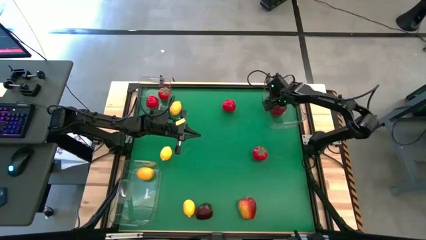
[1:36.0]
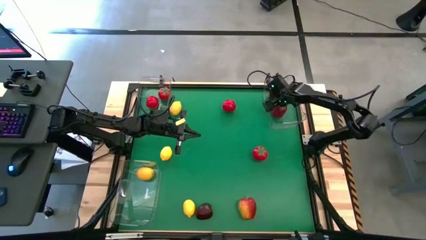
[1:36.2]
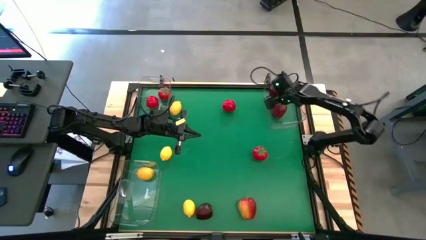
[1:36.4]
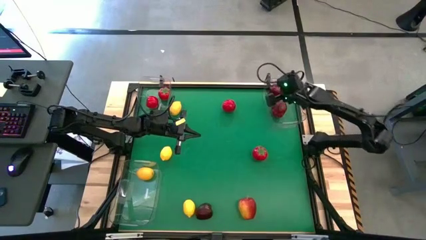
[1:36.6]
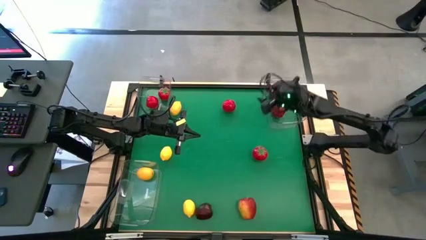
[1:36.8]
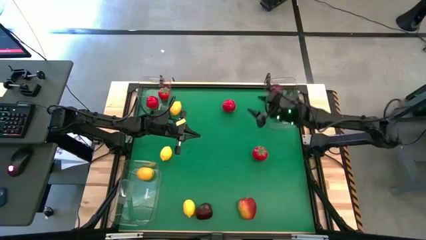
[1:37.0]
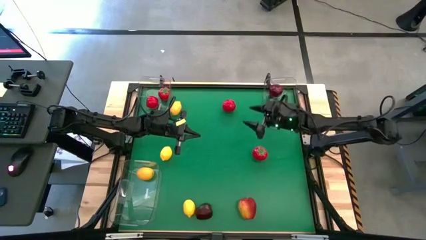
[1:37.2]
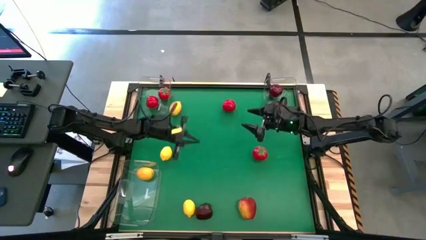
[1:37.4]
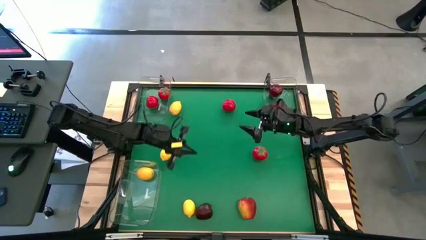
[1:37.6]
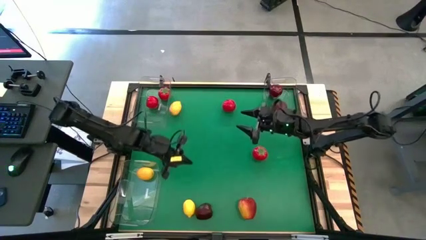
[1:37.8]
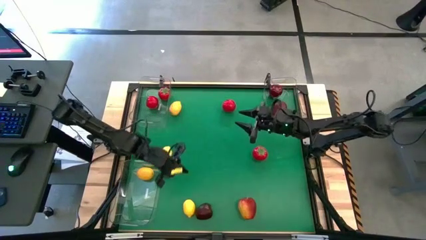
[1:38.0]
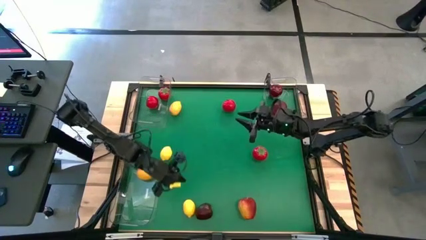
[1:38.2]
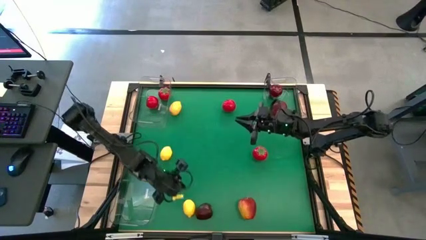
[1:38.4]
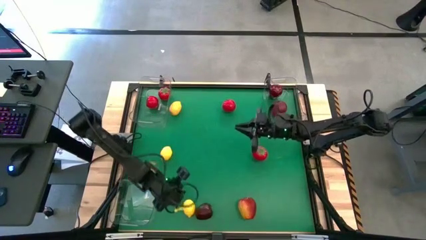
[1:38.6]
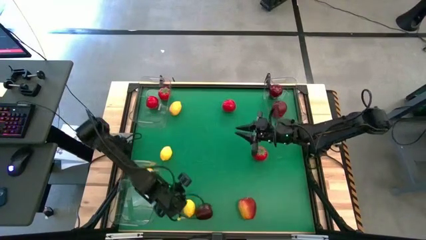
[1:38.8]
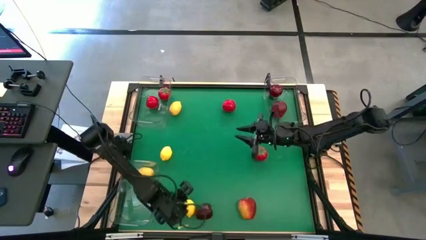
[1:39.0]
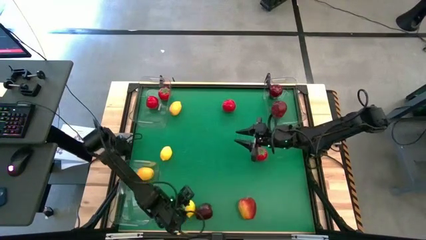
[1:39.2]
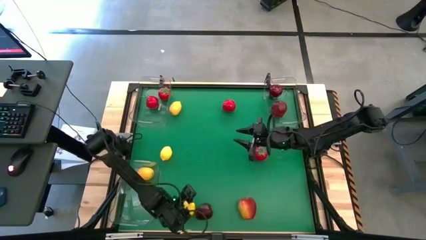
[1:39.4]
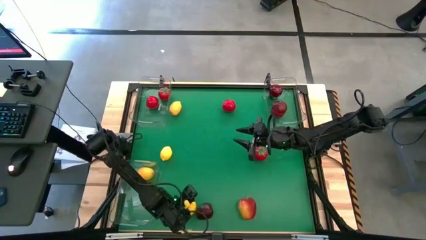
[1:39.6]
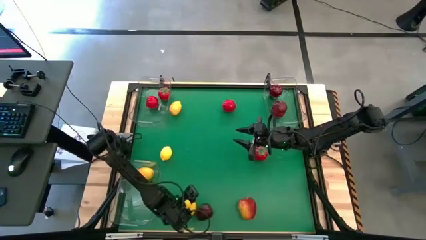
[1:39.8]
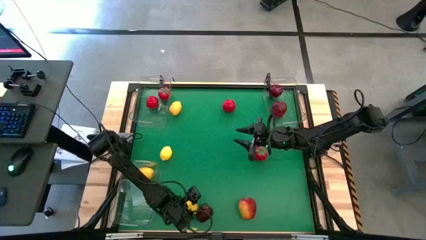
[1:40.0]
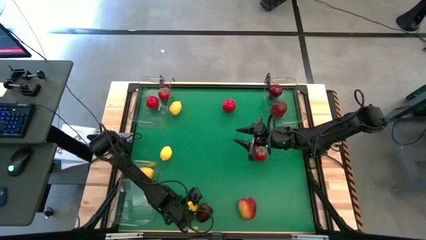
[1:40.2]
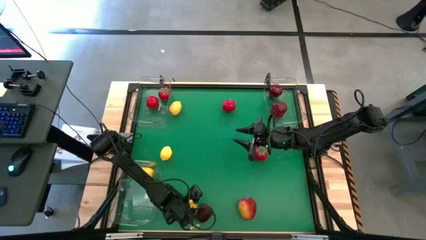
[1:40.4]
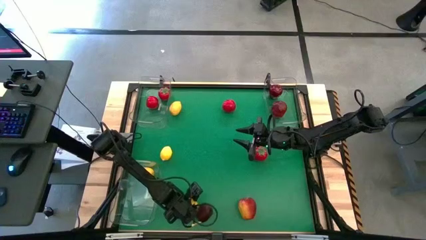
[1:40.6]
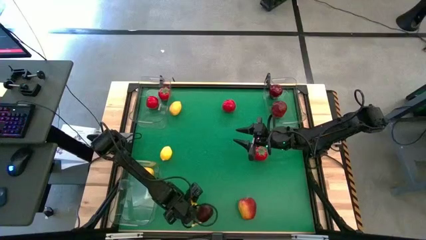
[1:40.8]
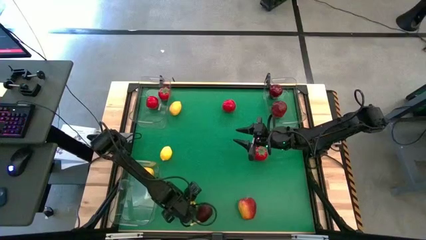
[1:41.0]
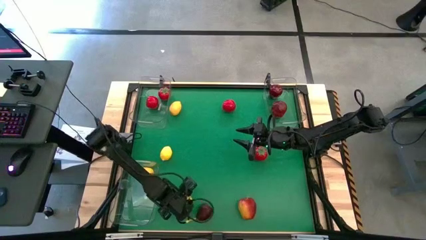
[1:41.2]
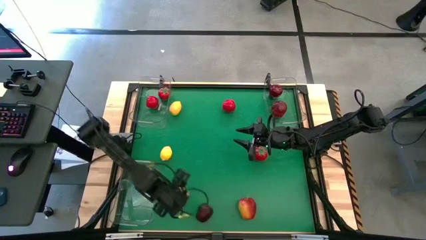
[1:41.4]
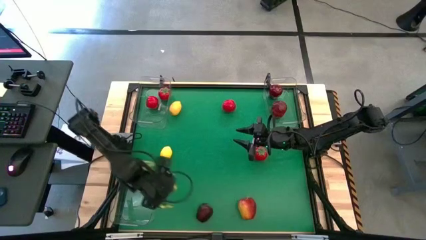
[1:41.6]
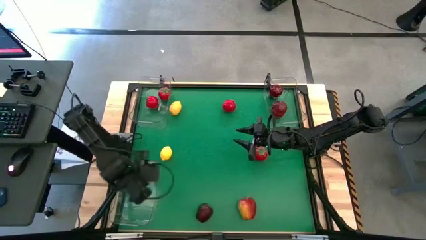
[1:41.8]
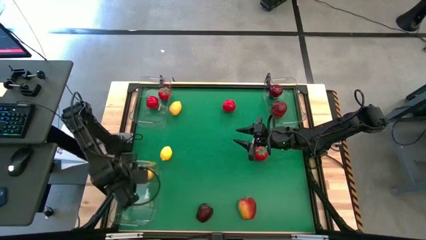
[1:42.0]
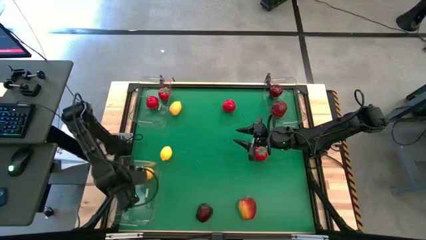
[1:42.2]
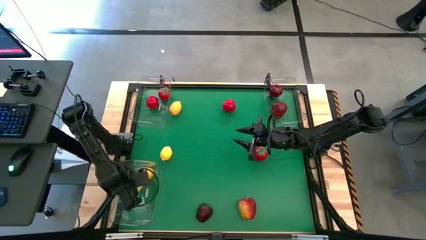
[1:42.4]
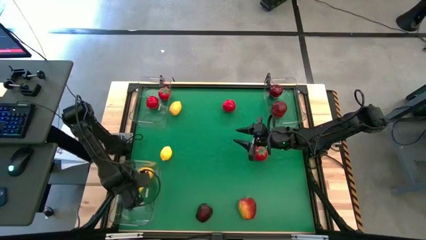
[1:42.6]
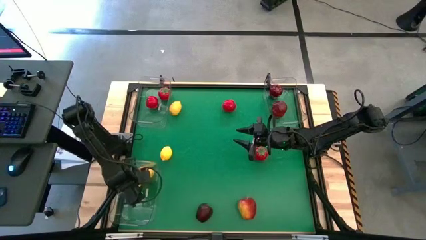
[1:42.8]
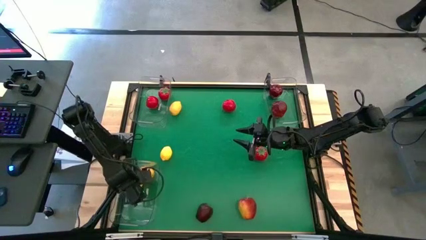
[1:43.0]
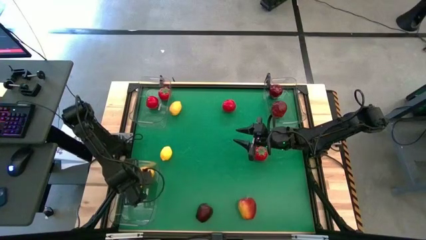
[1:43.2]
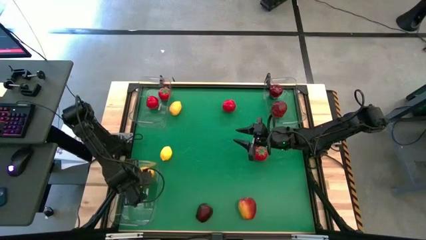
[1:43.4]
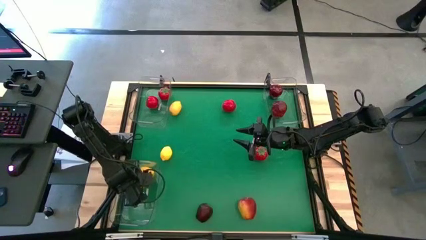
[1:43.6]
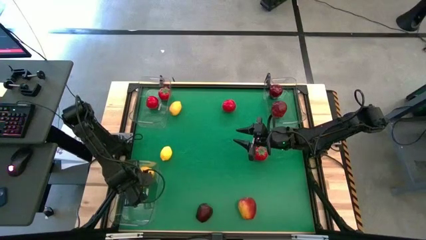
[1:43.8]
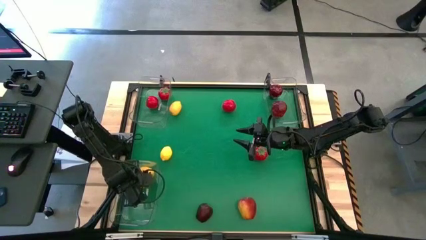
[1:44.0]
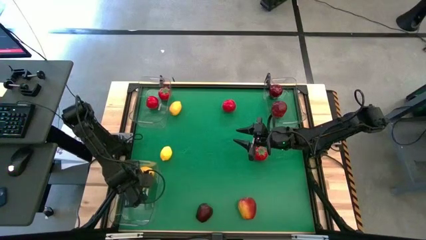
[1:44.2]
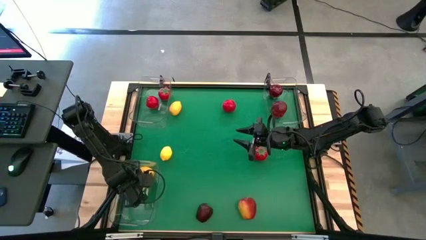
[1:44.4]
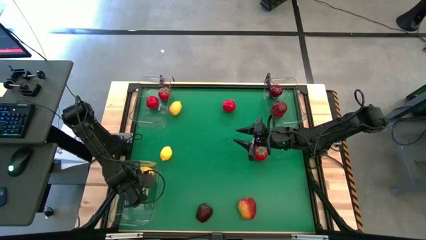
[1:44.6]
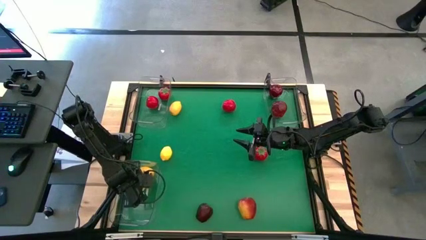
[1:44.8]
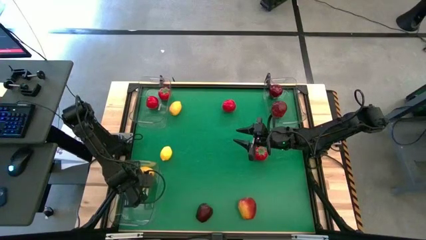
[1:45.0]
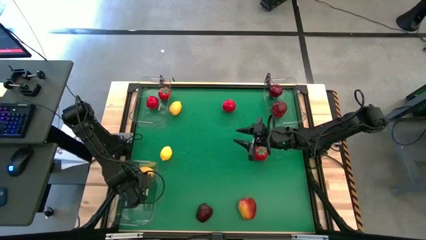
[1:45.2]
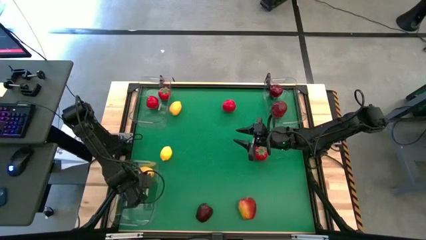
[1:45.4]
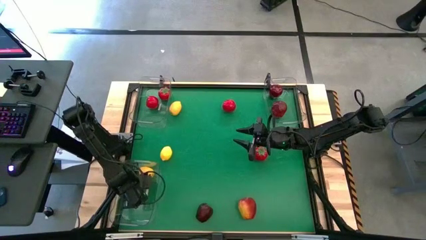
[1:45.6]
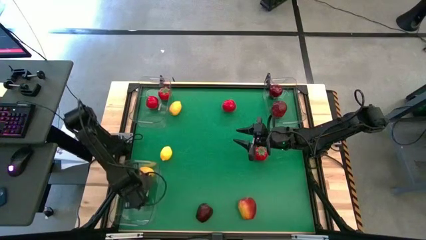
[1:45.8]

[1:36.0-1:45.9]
Task: Sort produce into baskets
Put the lemon into the bottom bin

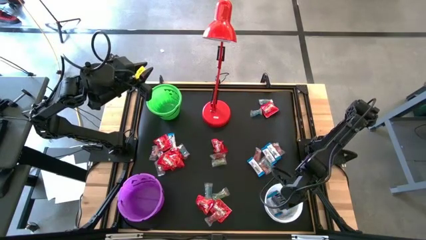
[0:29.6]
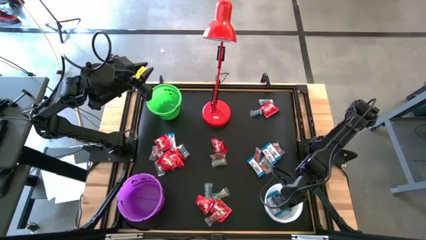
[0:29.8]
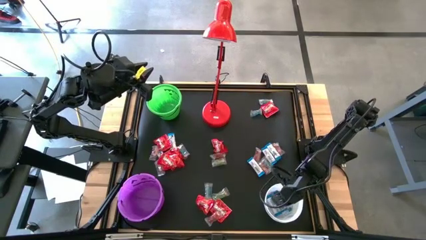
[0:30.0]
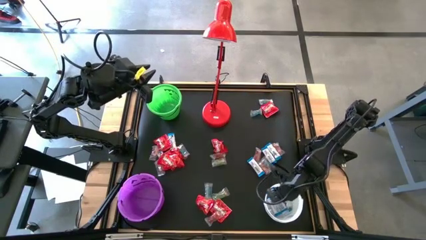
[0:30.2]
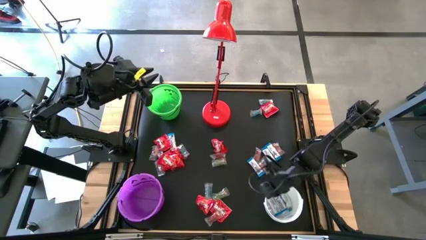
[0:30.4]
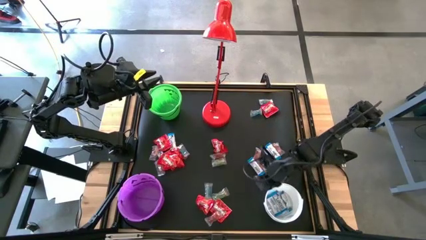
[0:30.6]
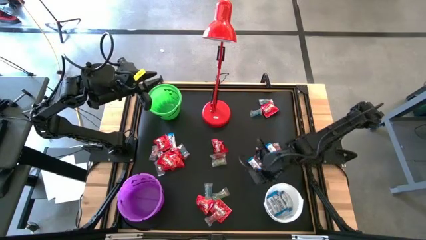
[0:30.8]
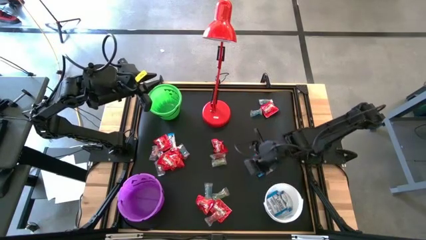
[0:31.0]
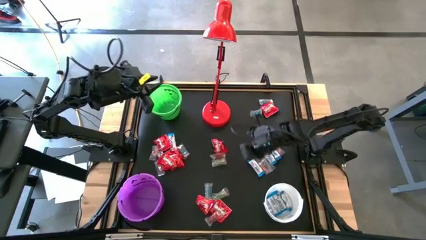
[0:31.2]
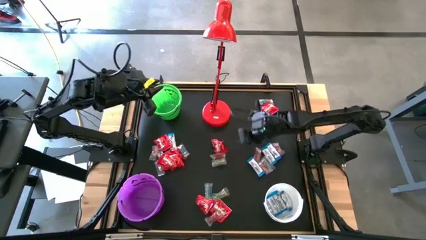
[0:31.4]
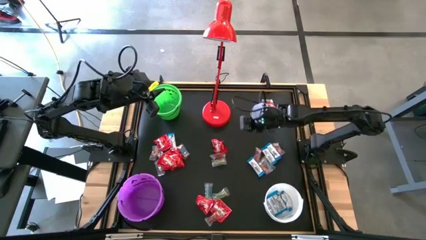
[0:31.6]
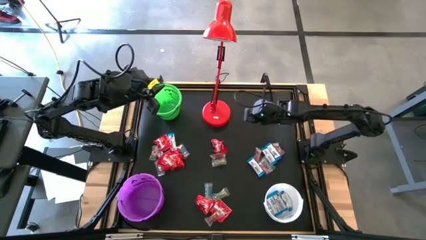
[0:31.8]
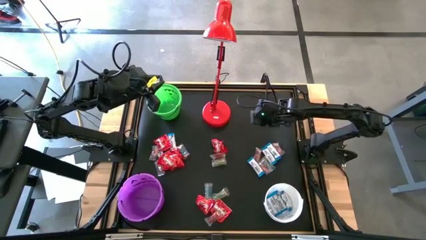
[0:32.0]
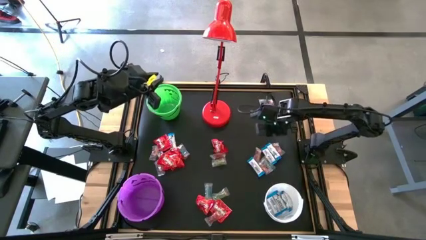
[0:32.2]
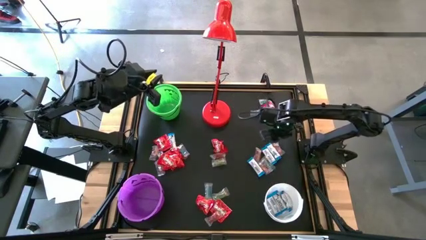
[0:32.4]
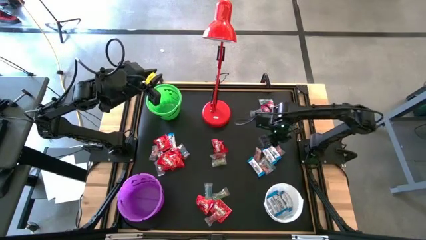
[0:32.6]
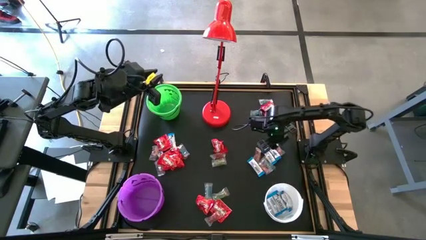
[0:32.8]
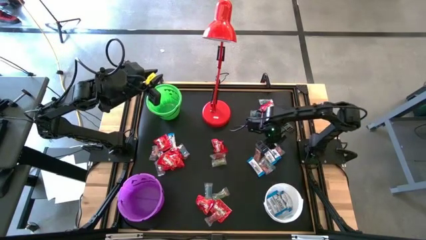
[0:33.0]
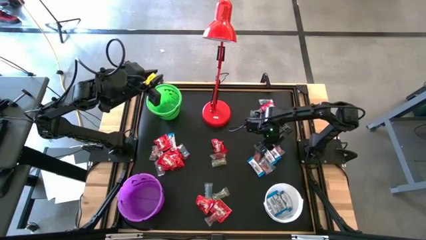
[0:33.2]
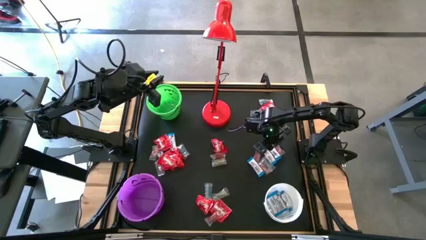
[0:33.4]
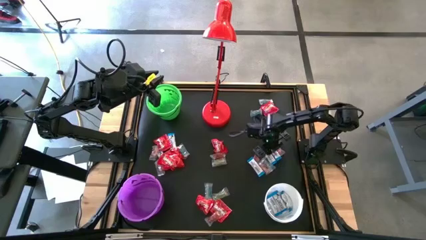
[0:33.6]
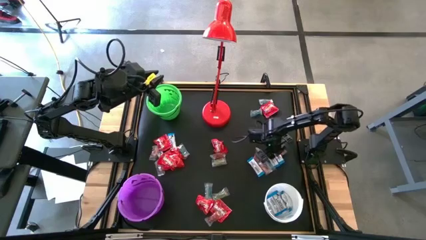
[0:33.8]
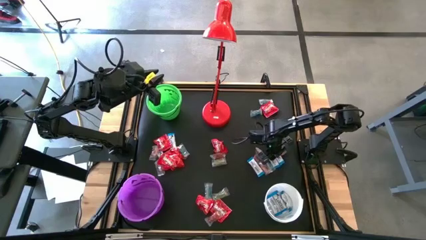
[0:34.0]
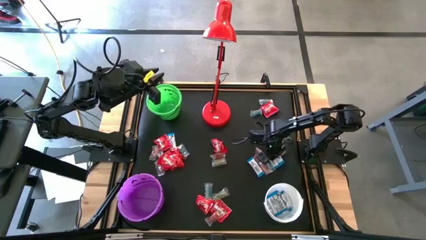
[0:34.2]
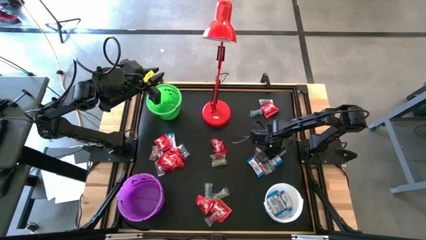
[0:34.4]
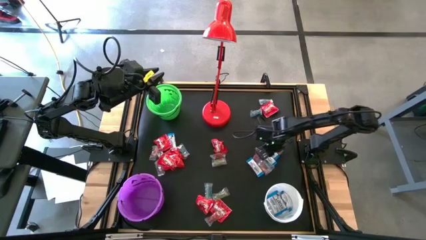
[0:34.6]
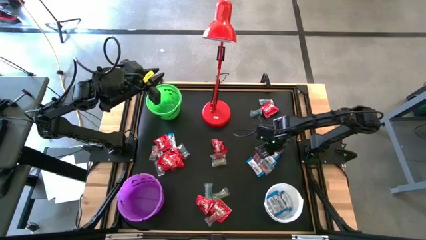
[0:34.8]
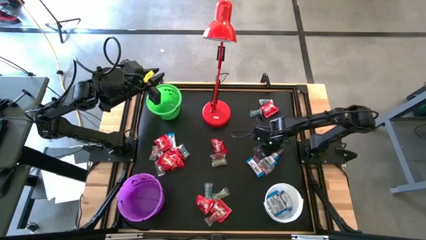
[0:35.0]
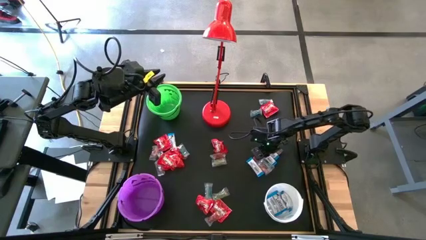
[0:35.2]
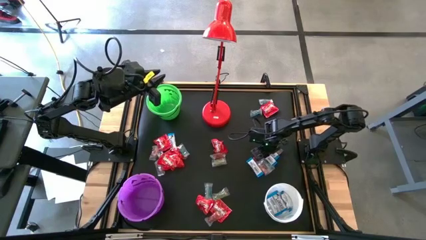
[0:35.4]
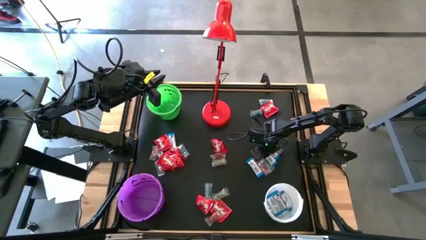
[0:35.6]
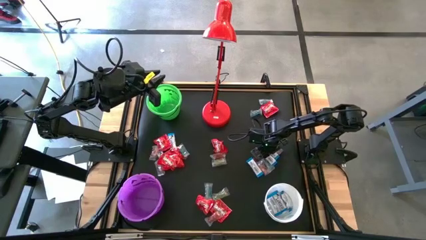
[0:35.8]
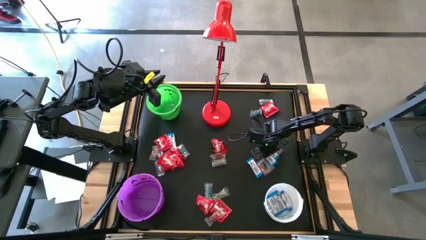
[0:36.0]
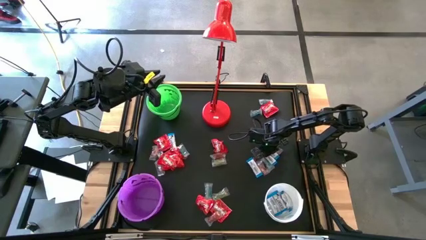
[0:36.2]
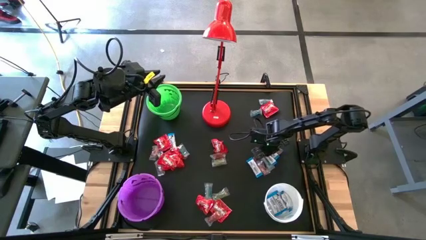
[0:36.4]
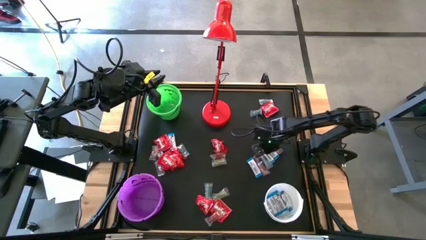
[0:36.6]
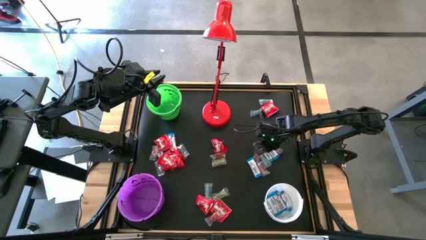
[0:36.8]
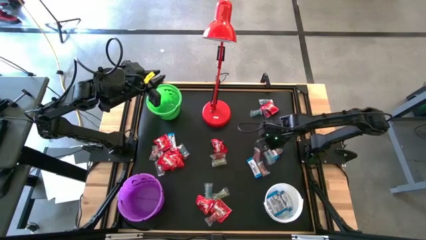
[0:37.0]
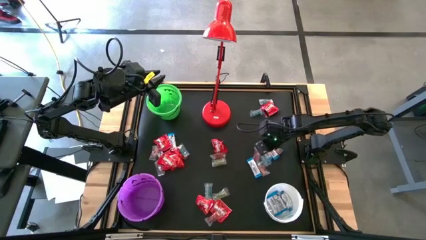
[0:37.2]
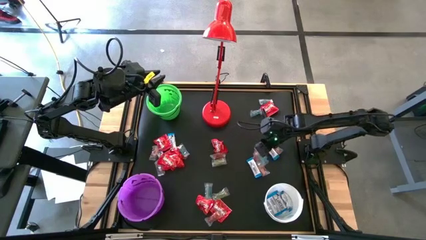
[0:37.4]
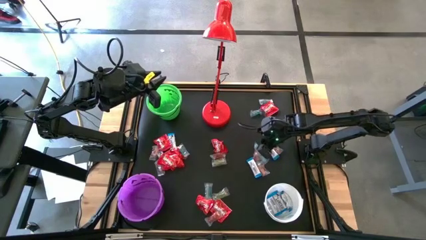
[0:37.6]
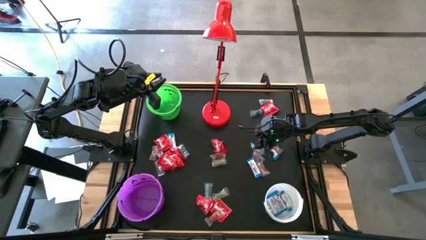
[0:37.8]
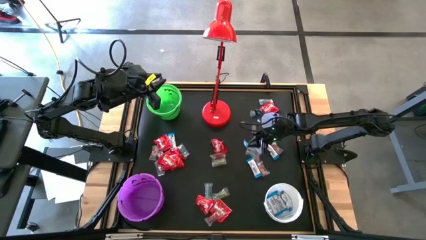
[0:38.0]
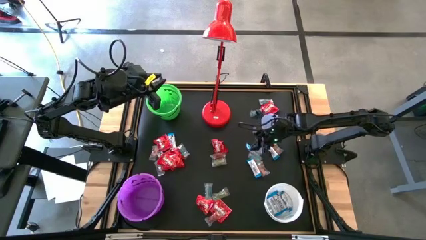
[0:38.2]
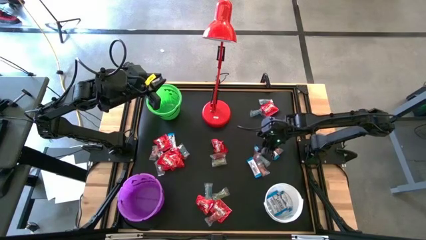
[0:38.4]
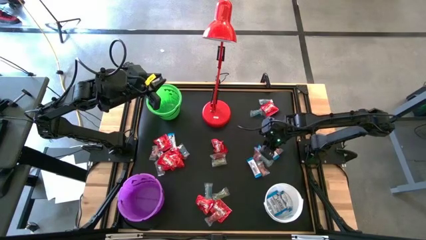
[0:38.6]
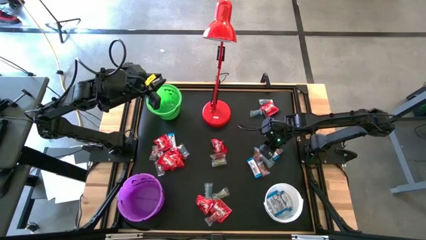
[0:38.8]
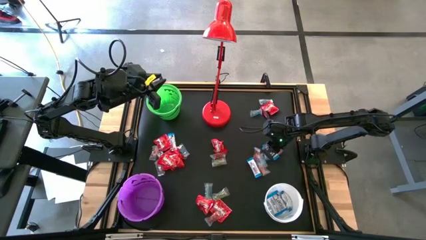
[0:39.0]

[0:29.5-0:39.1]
Task: Sort candy
Put the white chocolate into the white bucket
